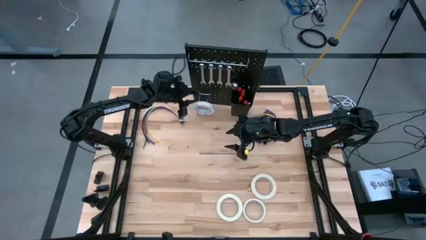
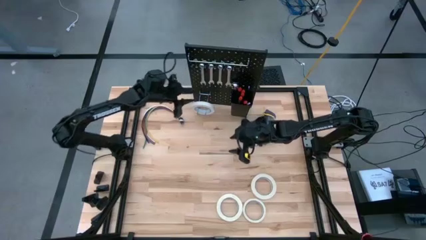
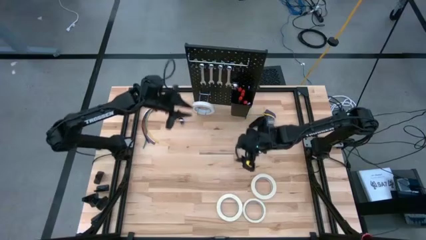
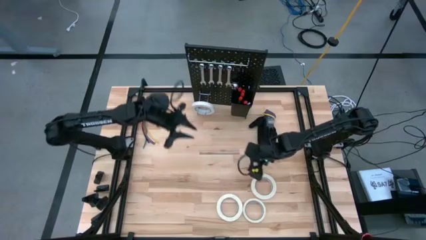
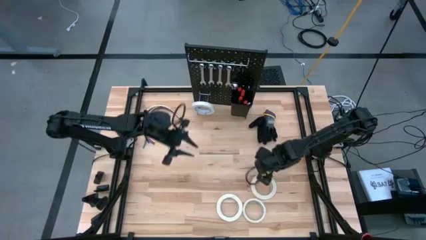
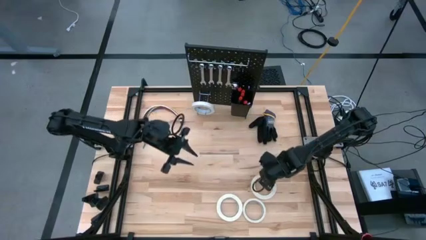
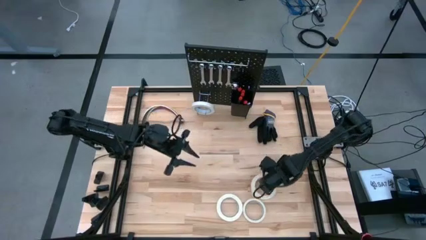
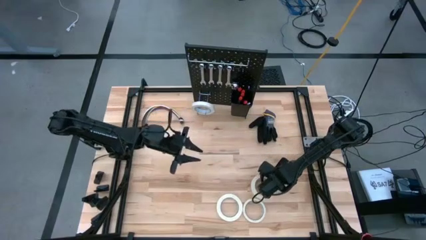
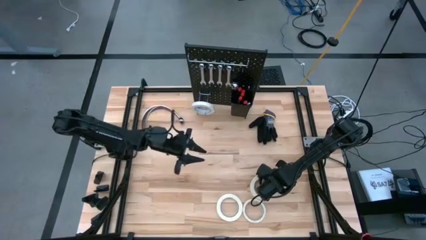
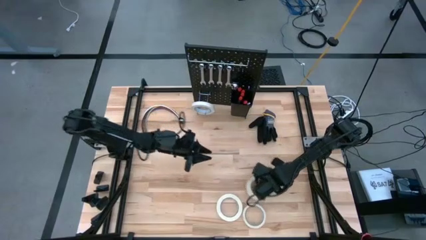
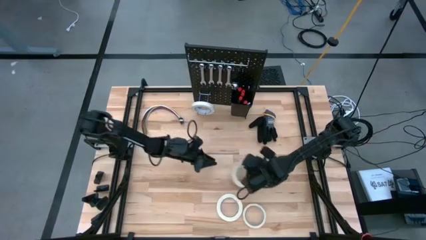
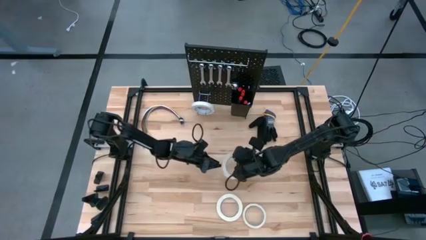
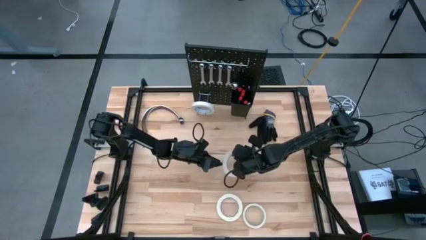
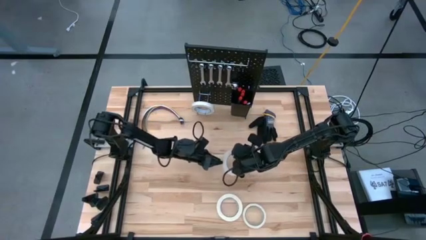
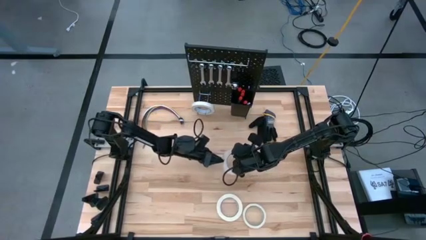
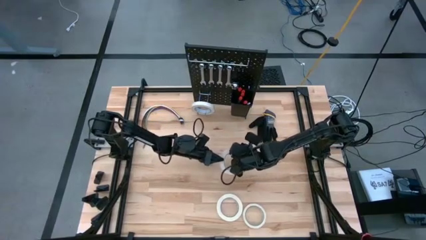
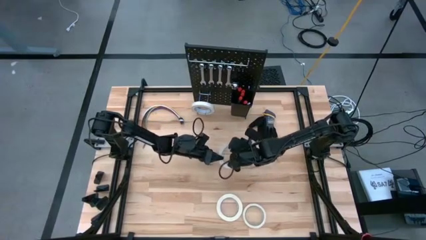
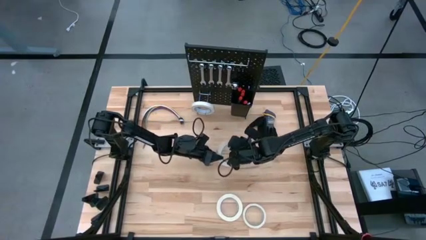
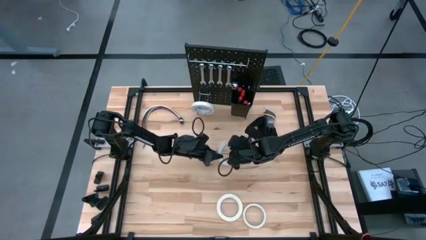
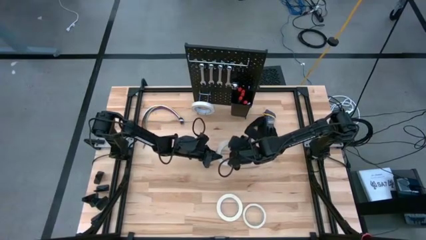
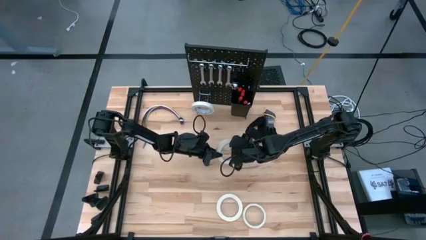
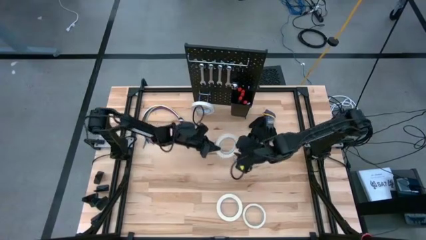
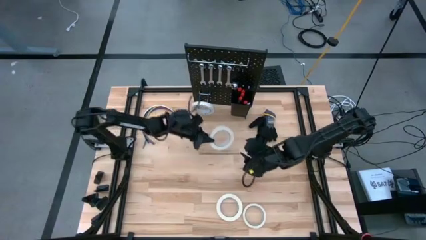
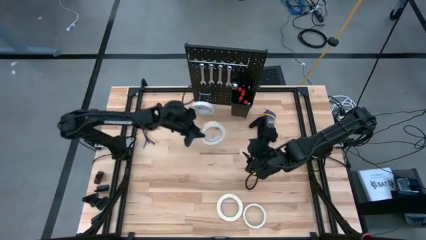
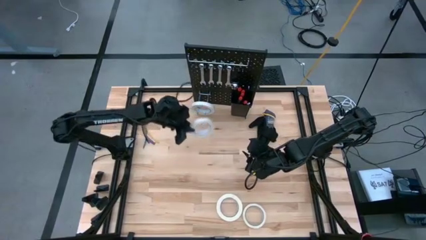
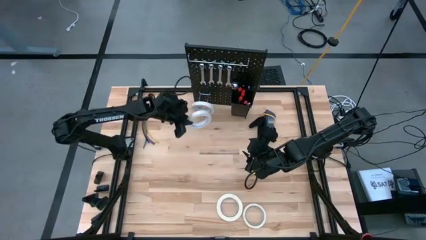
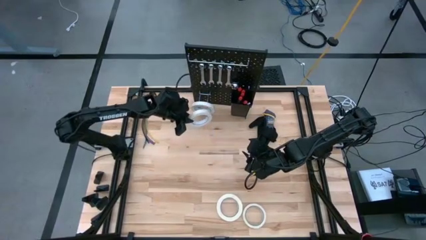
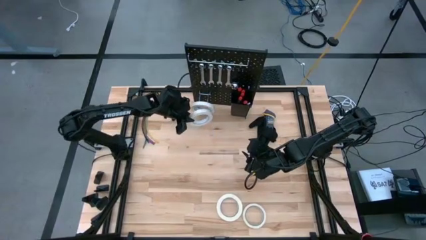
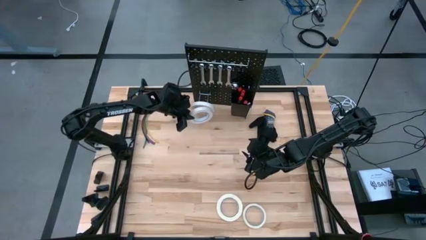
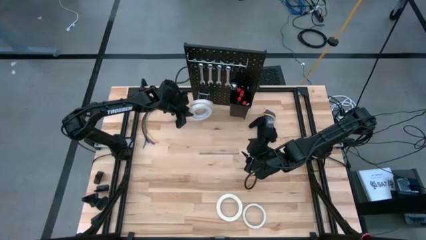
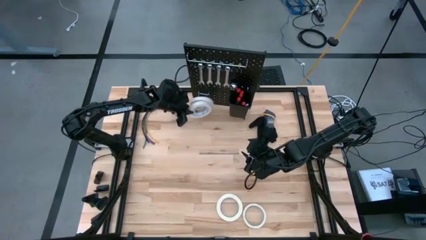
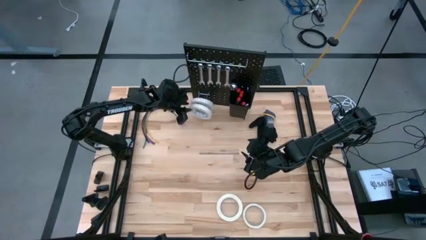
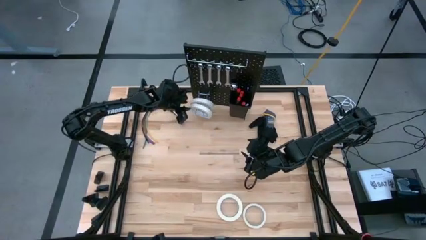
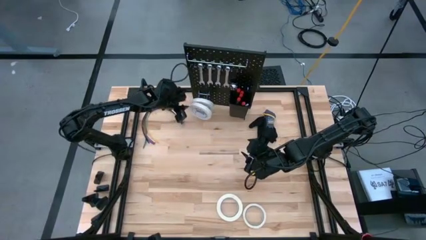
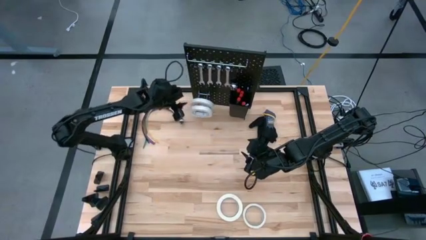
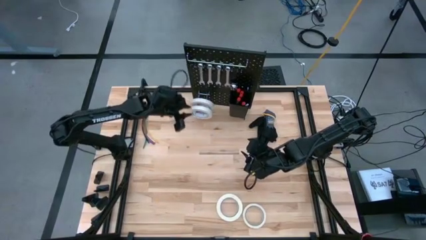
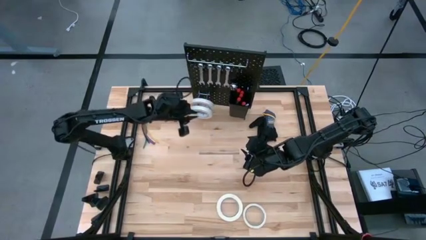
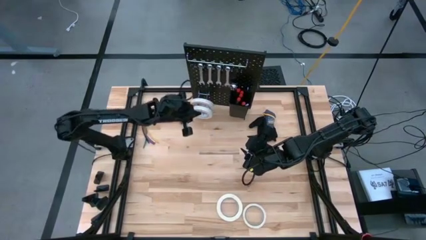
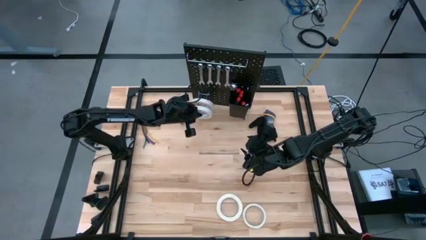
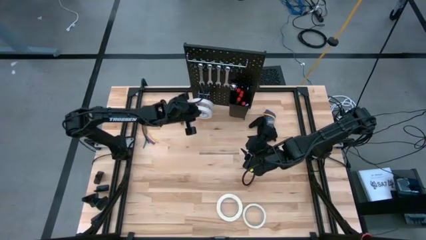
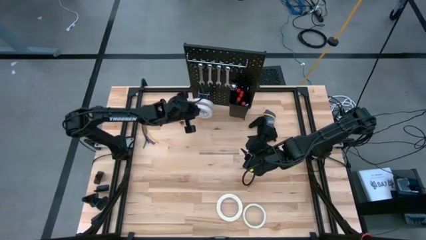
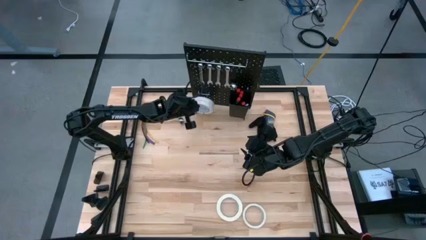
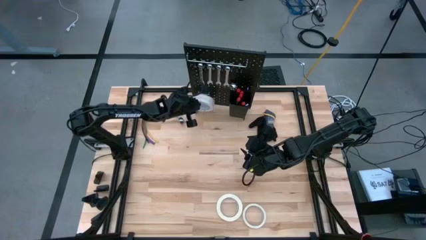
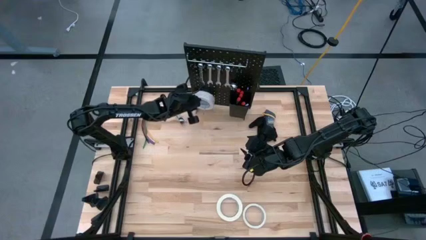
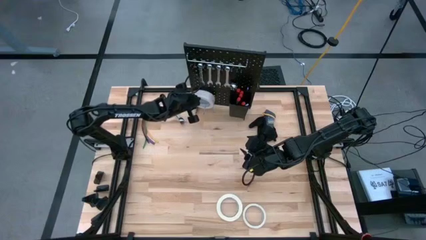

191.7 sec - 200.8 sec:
Task: Hang tools onto peg board
Hang the white tape on the peg board

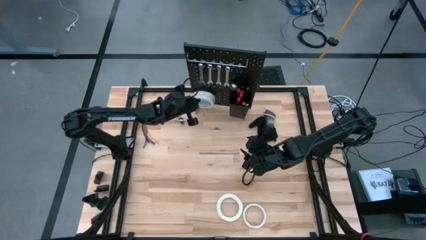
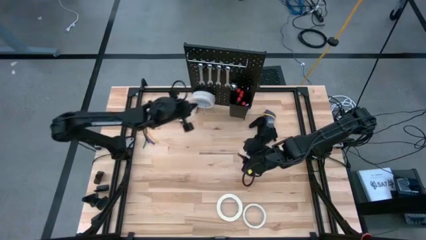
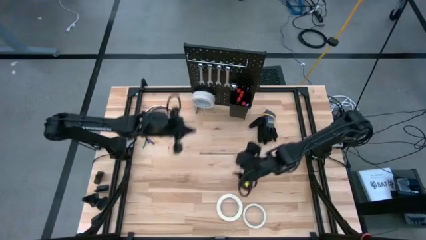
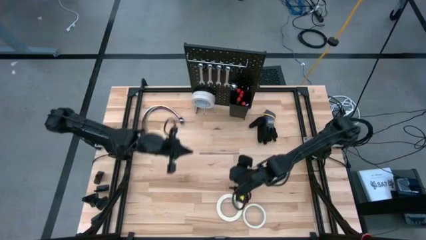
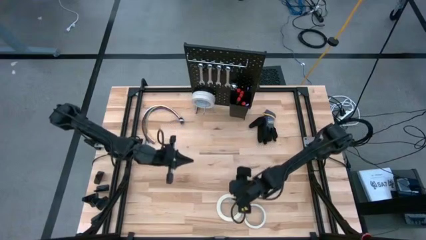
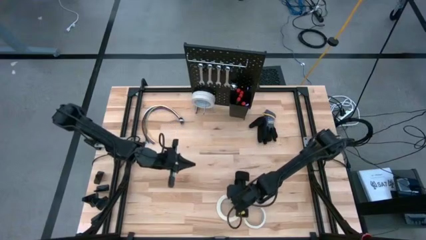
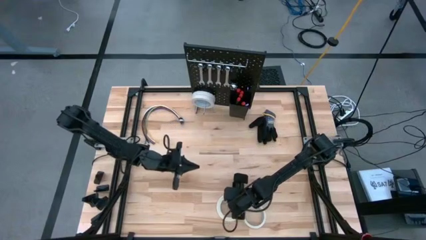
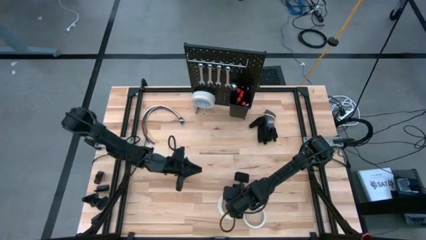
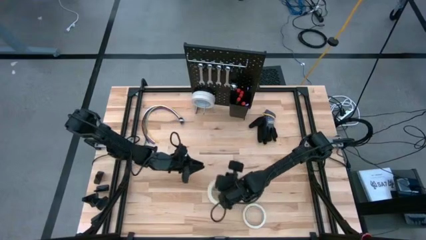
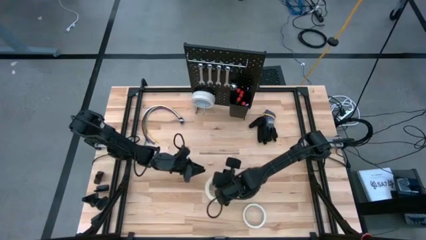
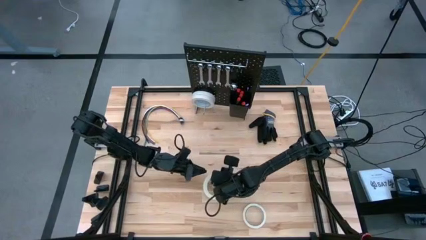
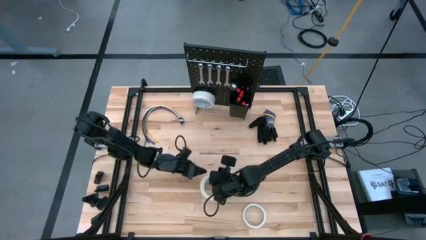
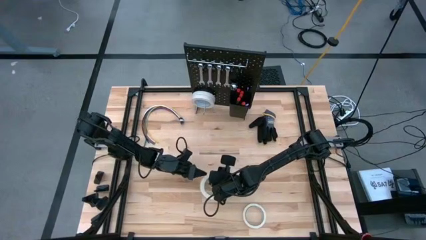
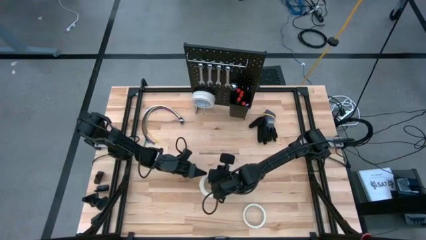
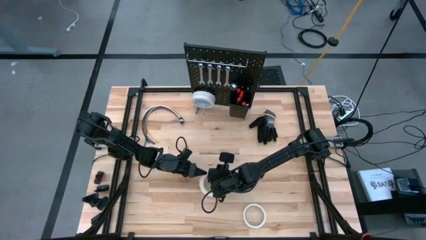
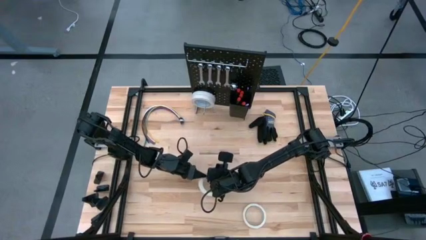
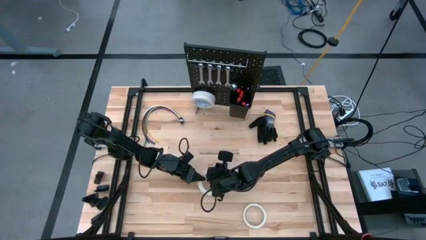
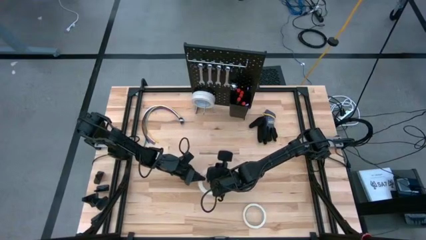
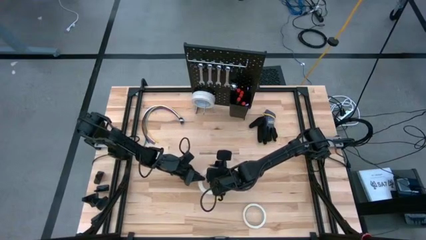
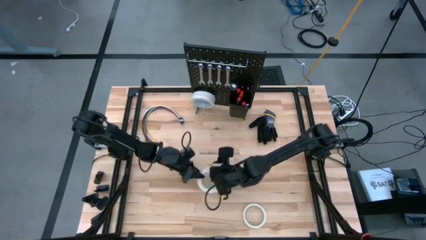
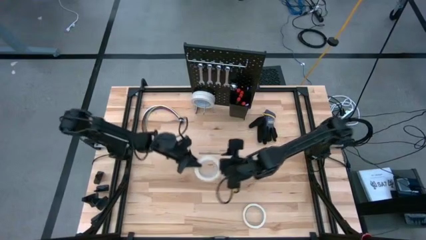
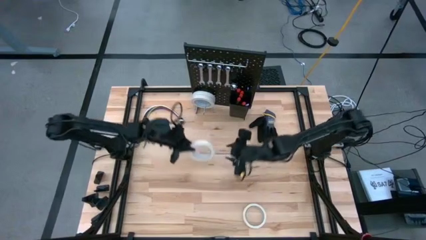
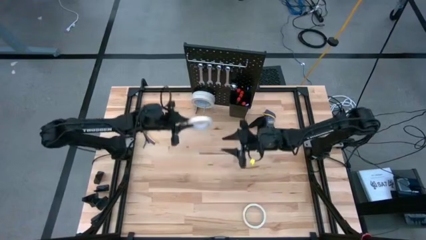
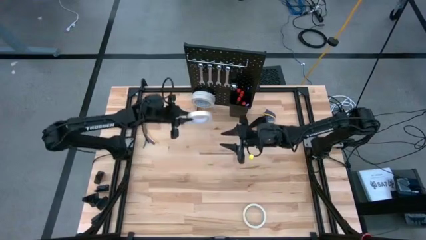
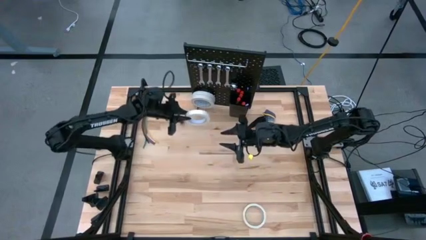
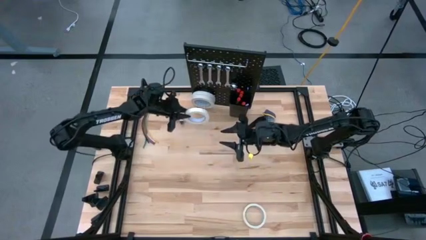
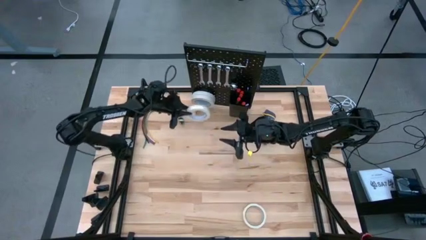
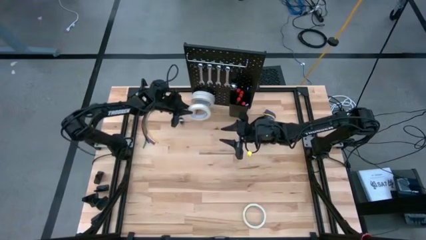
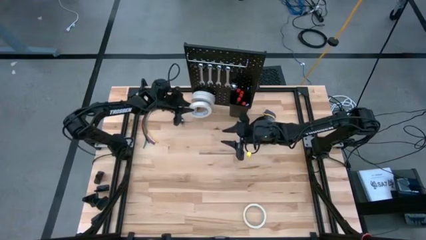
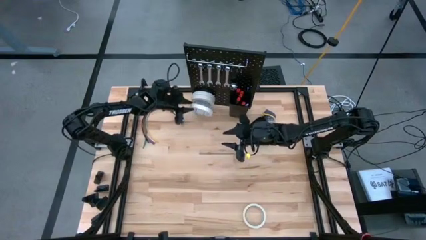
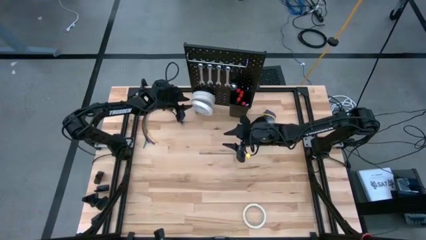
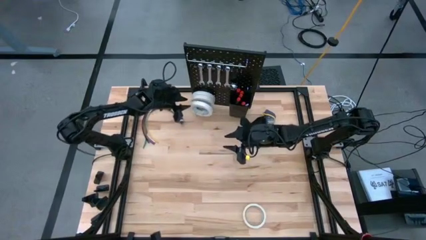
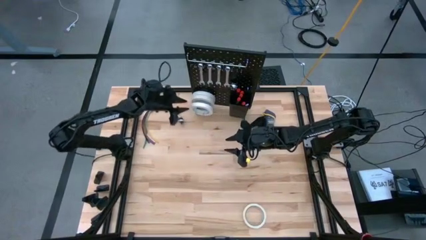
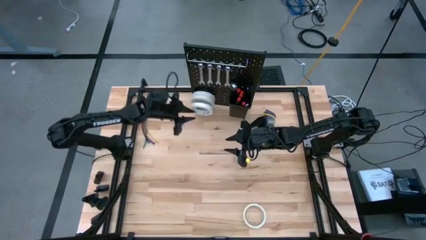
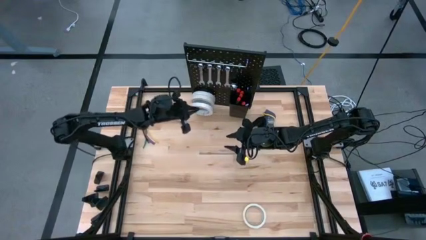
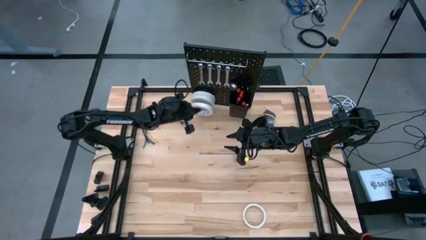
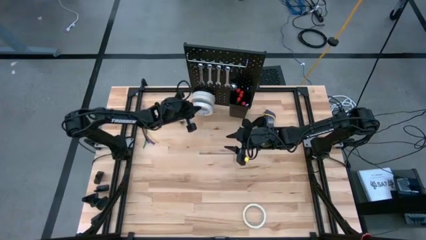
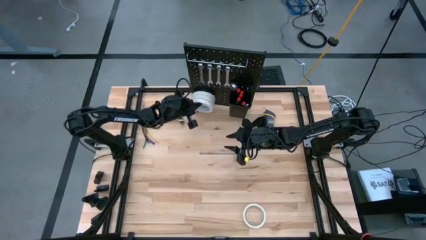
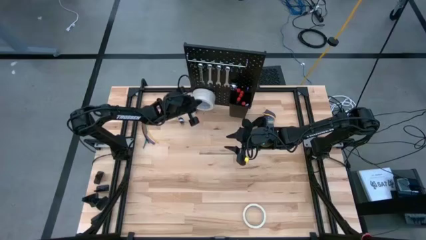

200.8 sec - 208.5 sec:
Hang the white tape on the peg board

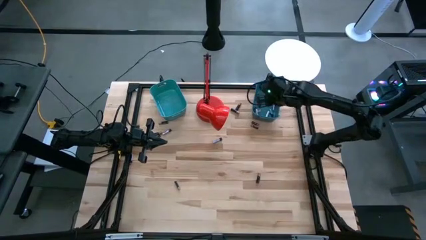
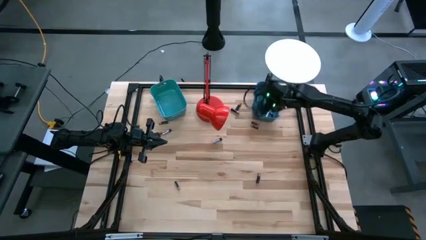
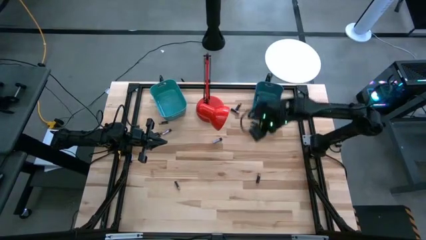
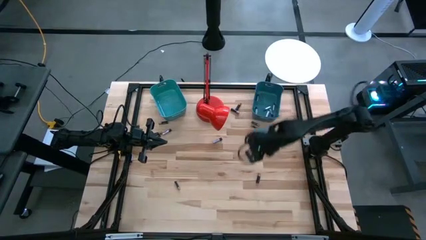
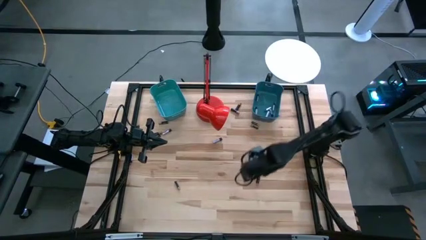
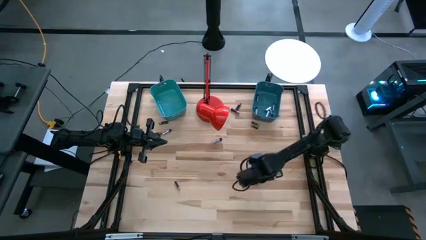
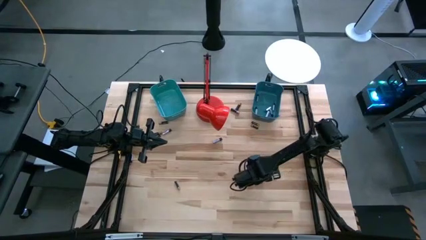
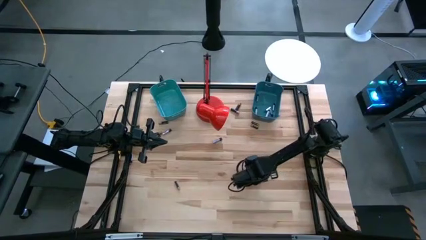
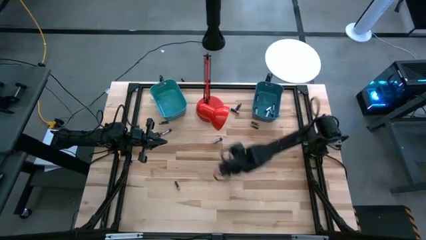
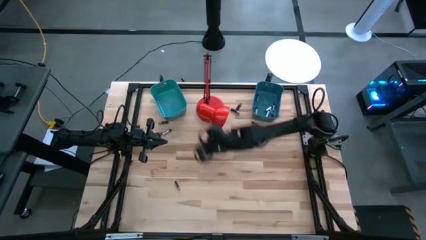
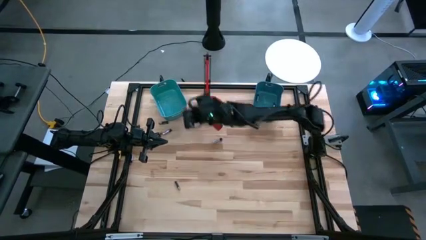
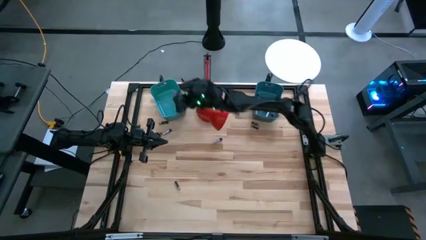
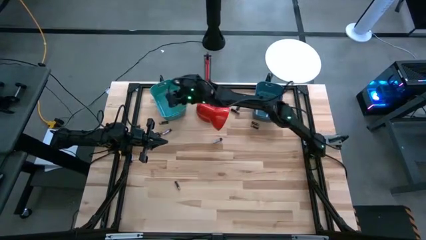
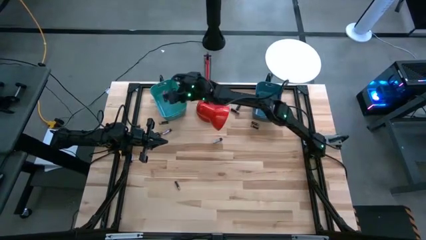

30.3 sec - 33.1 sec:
Task: Sort batteries
Put the brown battery into the blue bin
